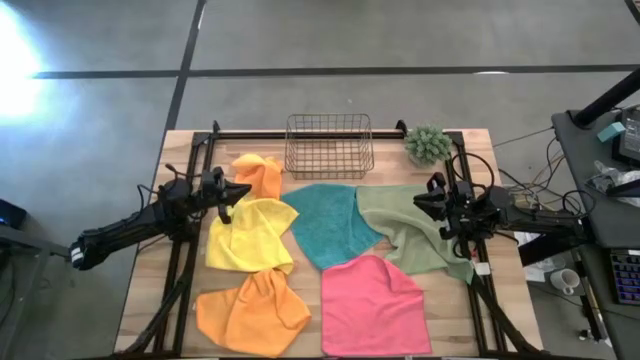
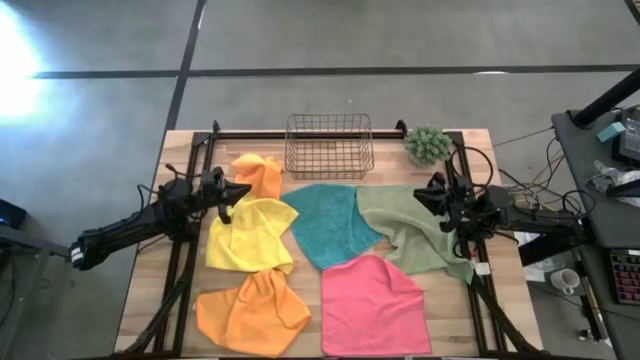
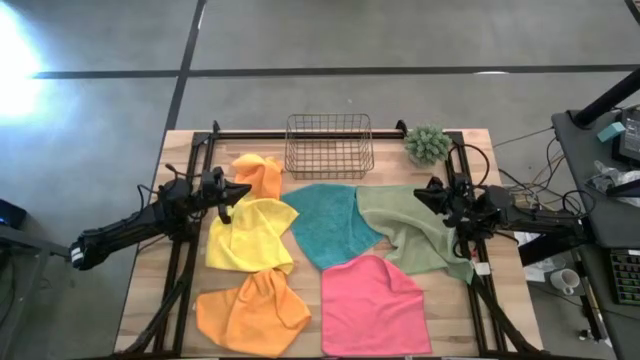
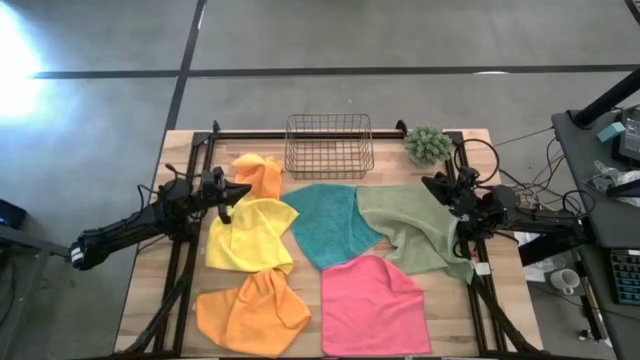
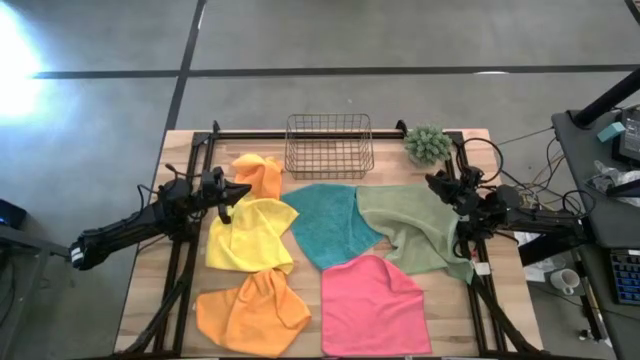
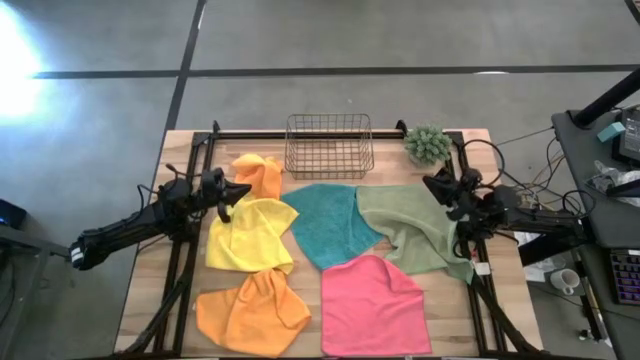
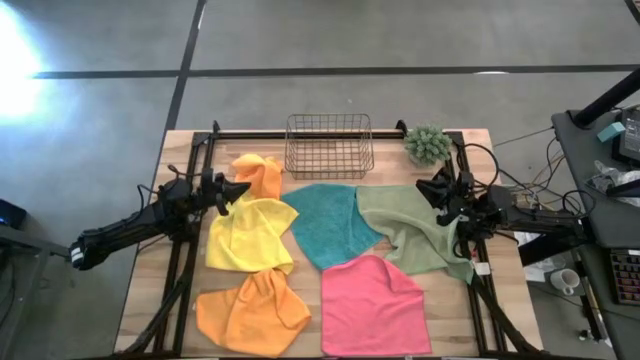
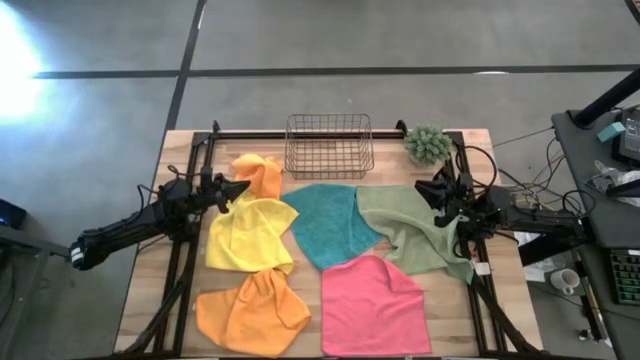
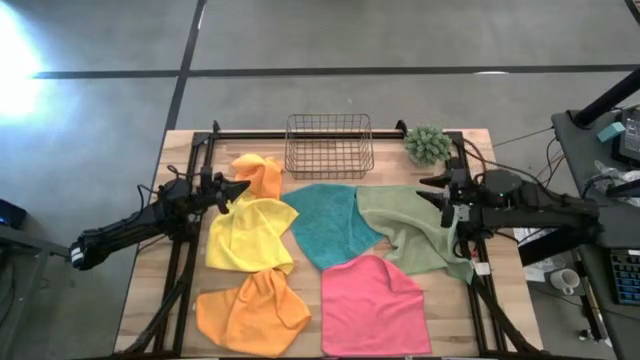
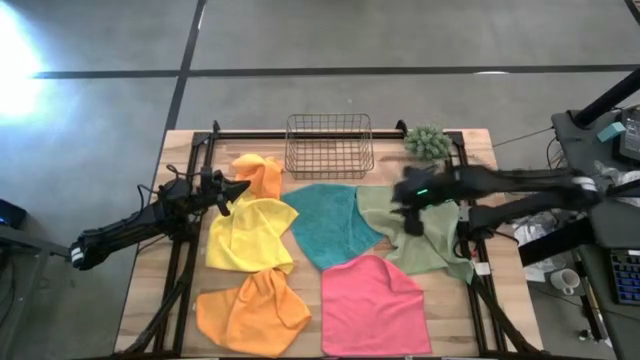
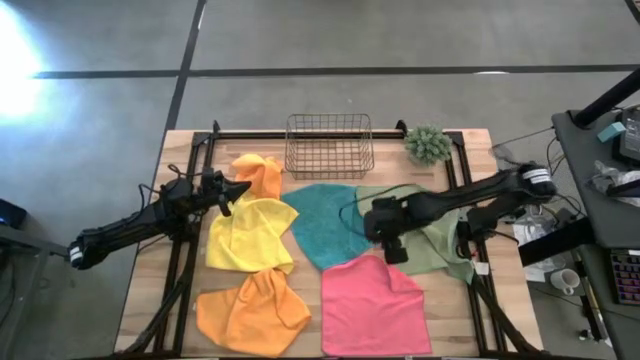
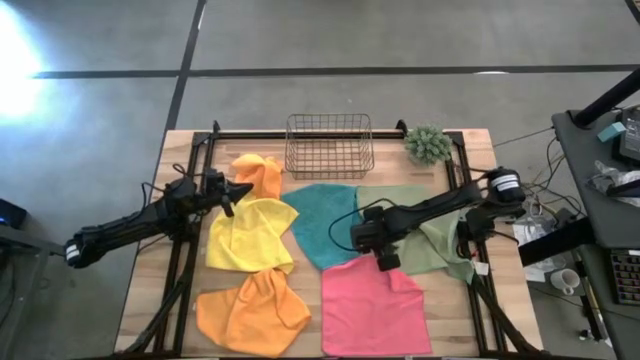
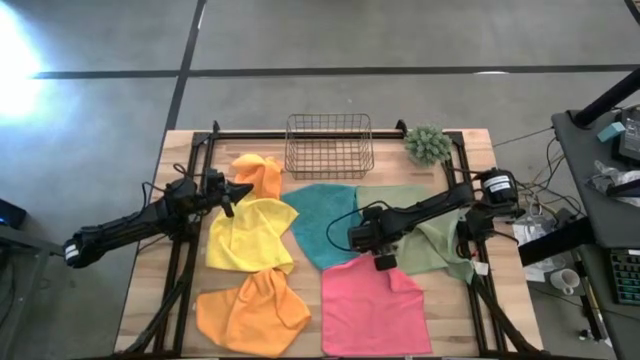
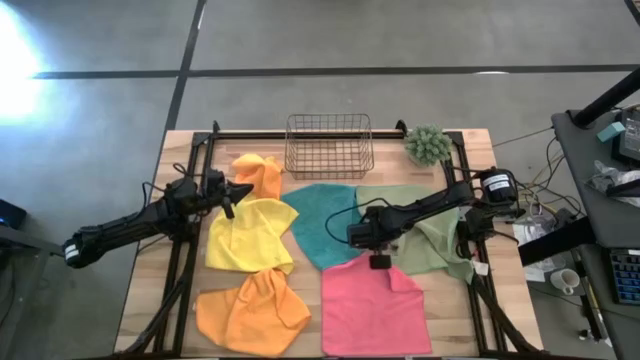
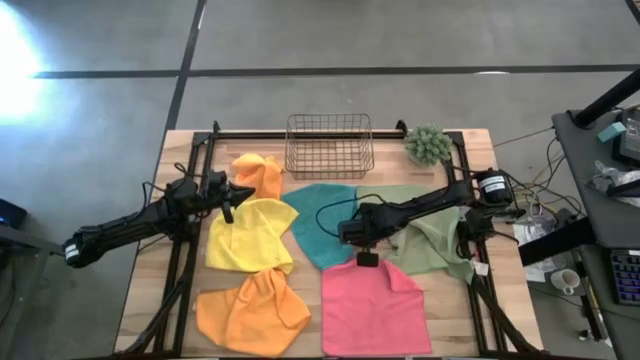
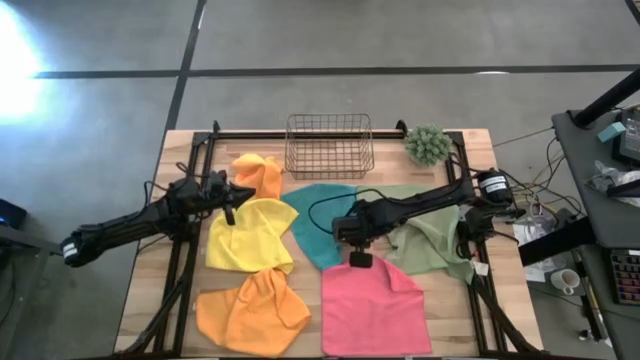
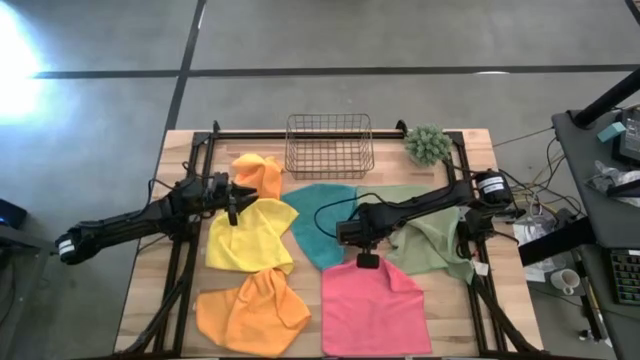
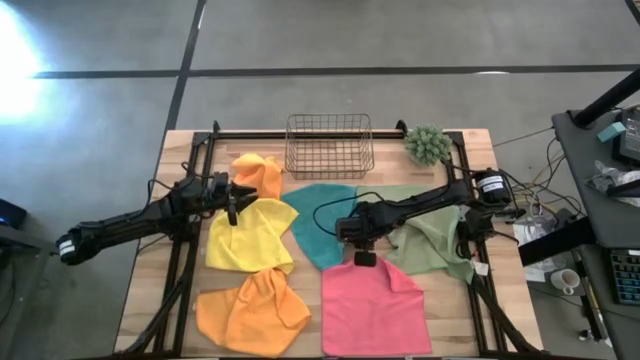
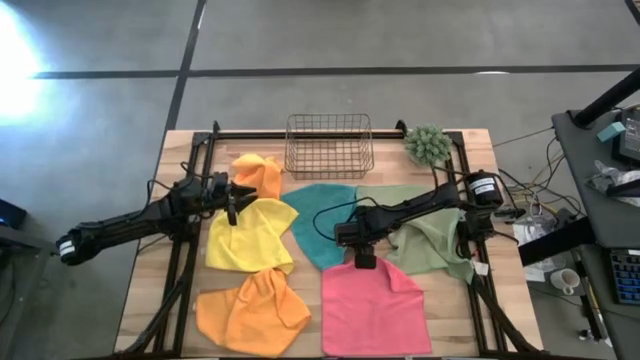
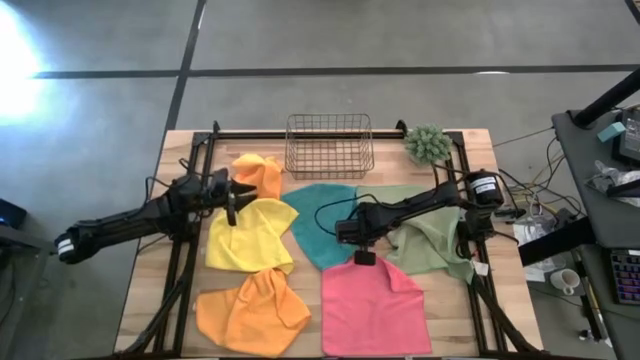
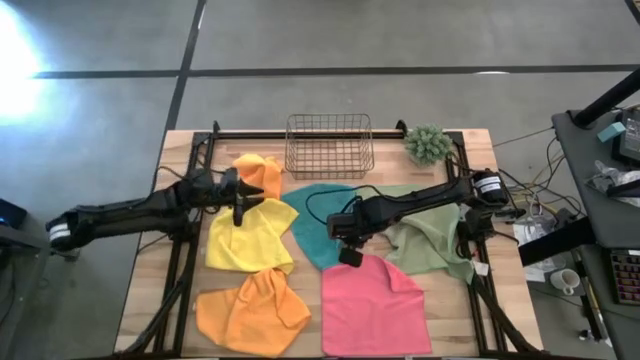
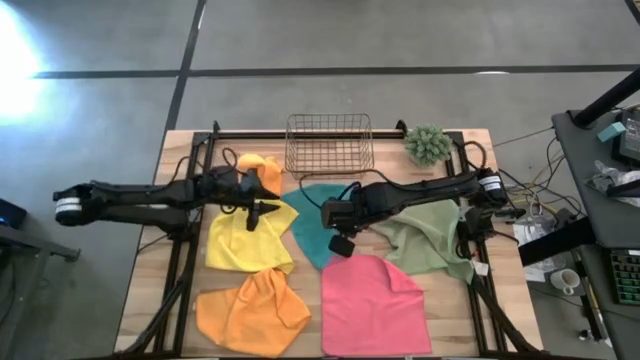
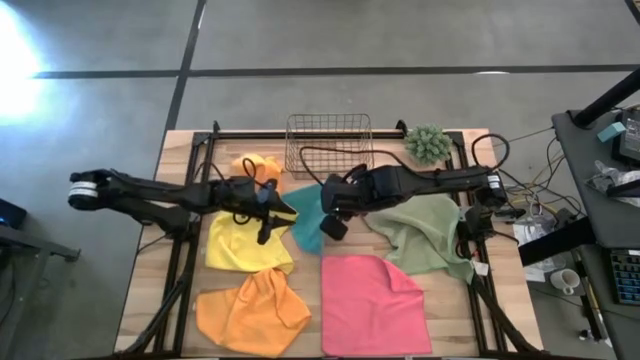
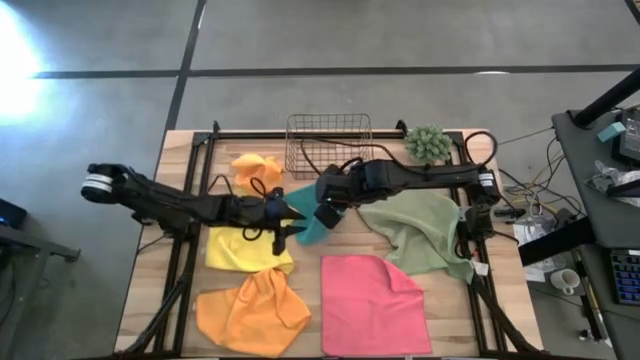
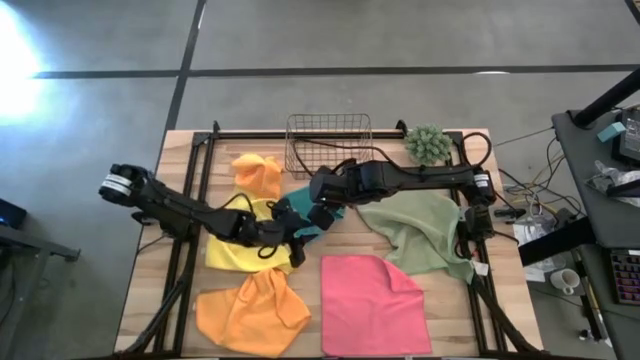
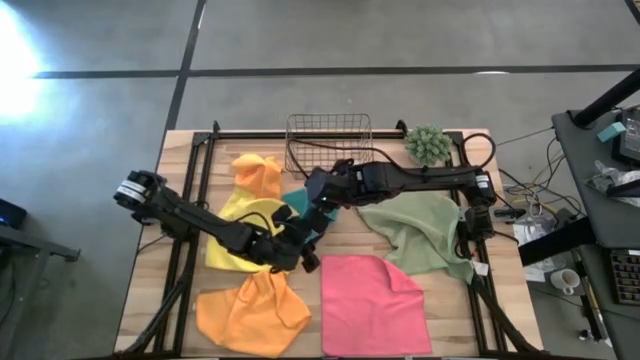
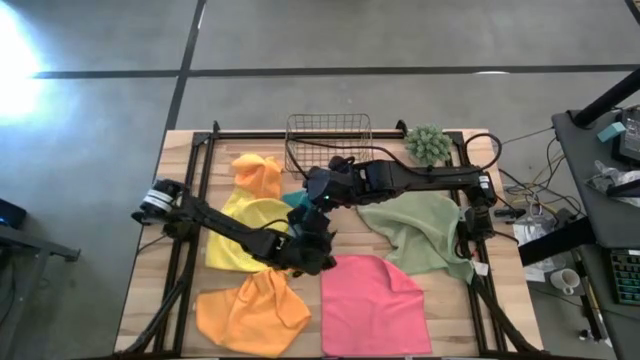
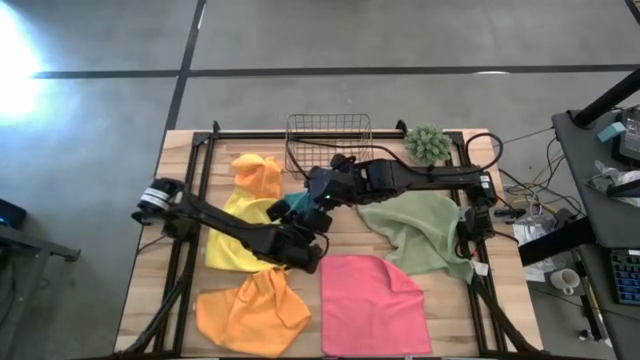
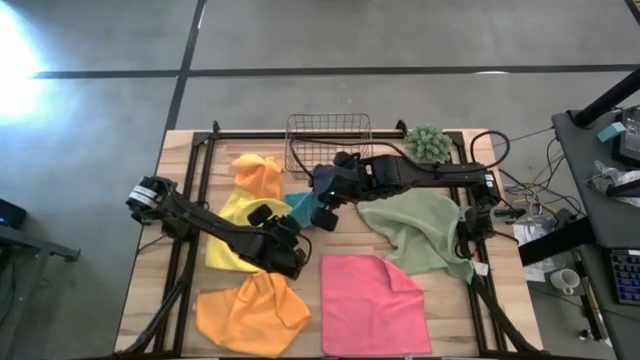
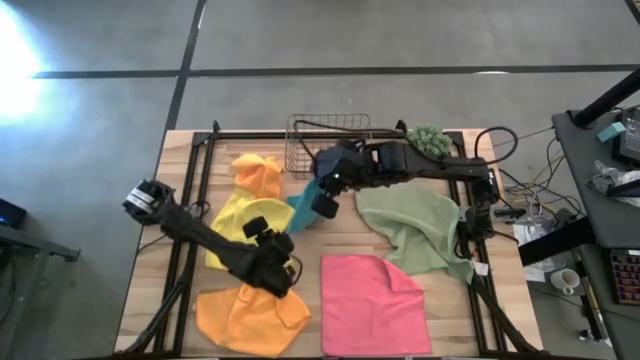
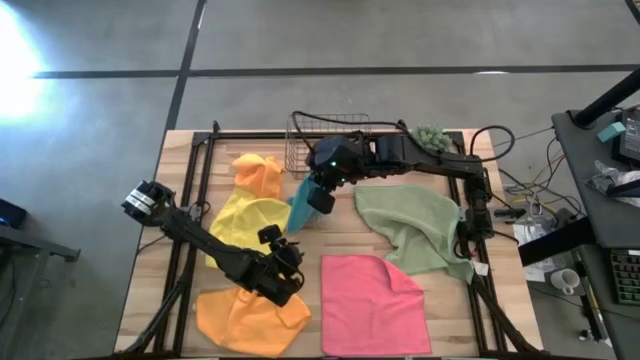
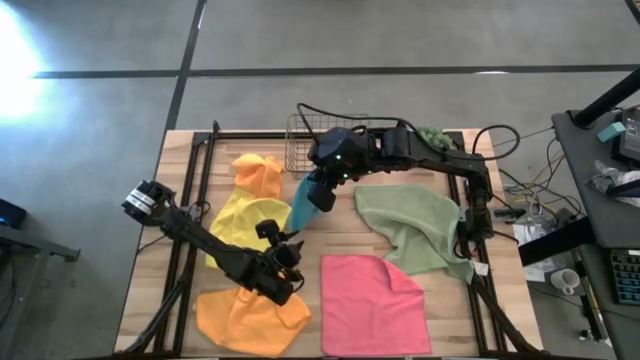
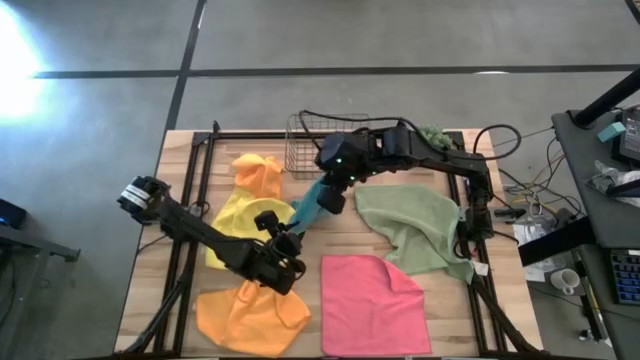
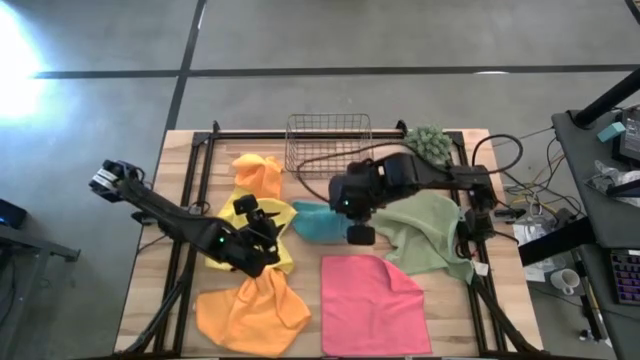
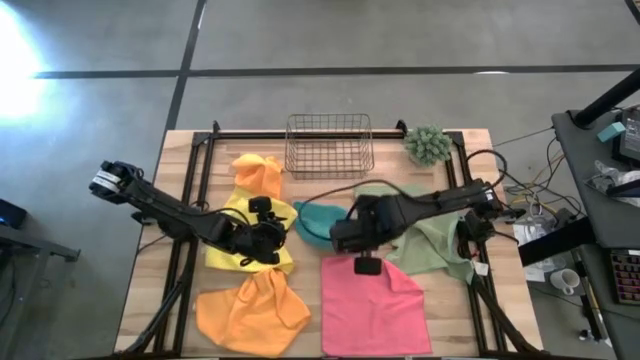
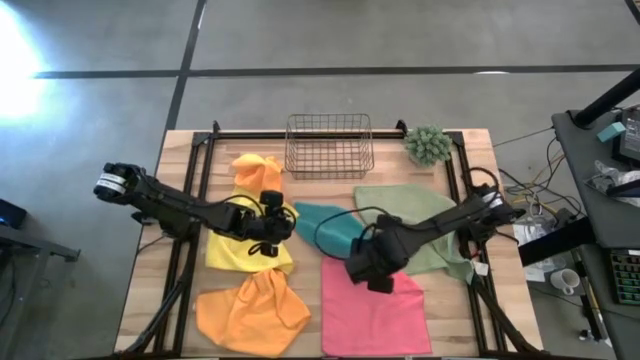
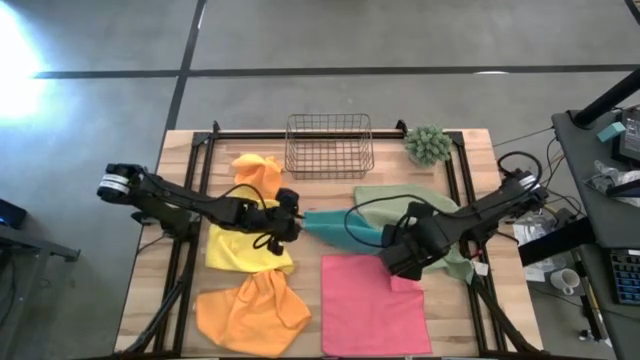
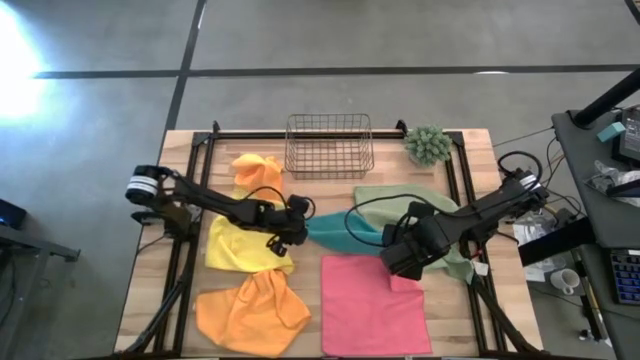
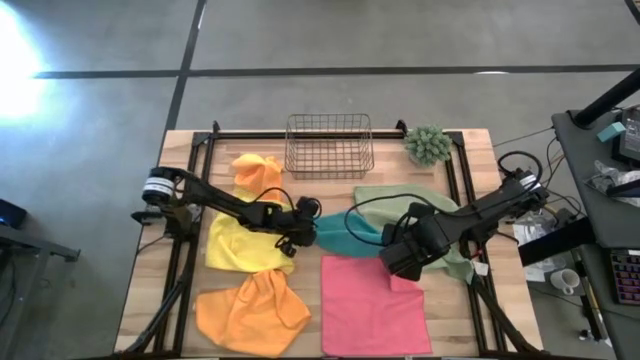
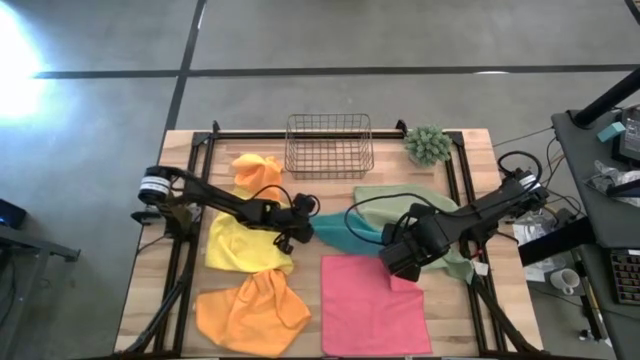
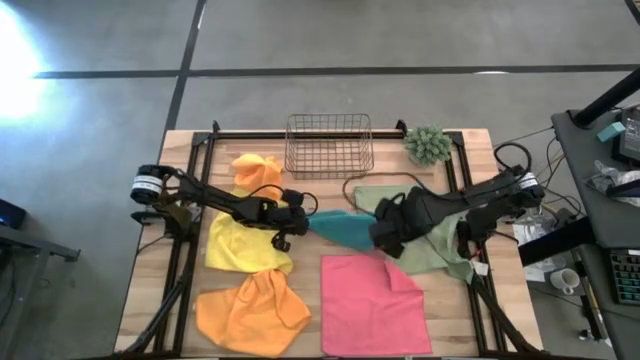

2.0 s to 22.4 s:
Task: Fold microfiber towels
Fold the blue microfiber cloth
